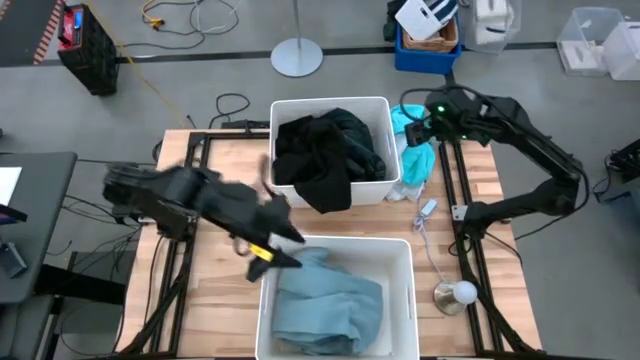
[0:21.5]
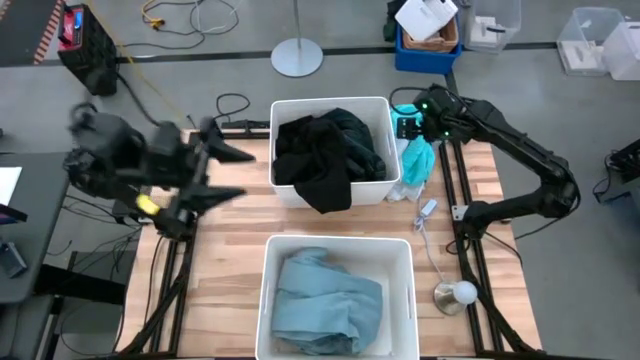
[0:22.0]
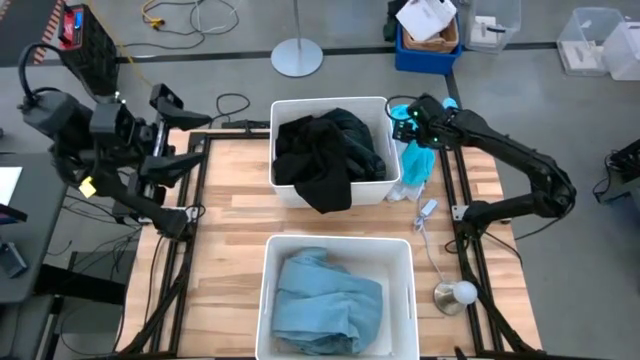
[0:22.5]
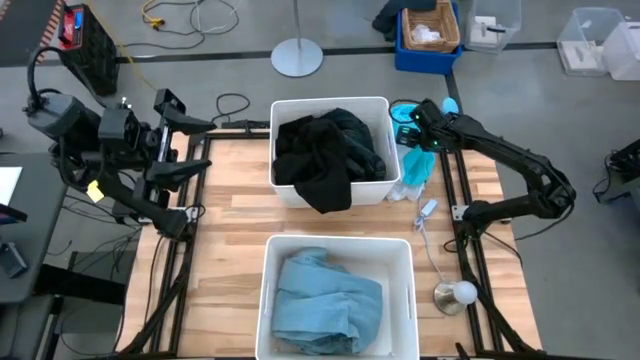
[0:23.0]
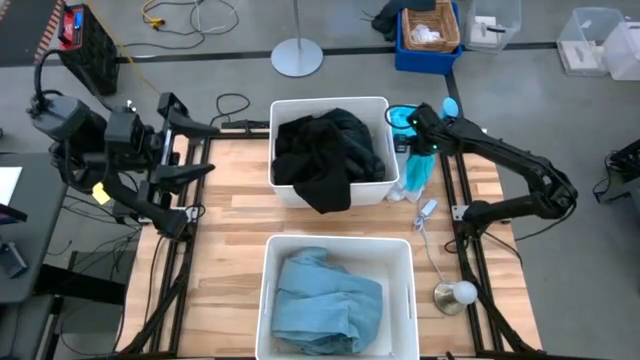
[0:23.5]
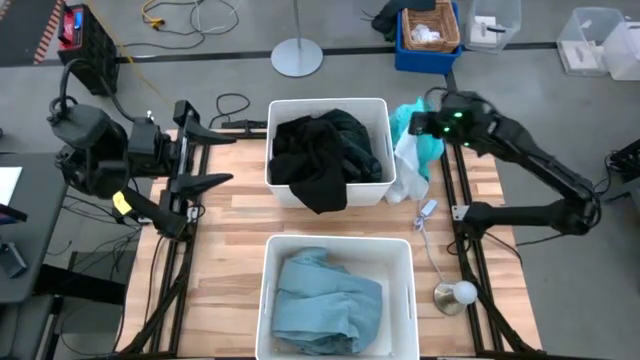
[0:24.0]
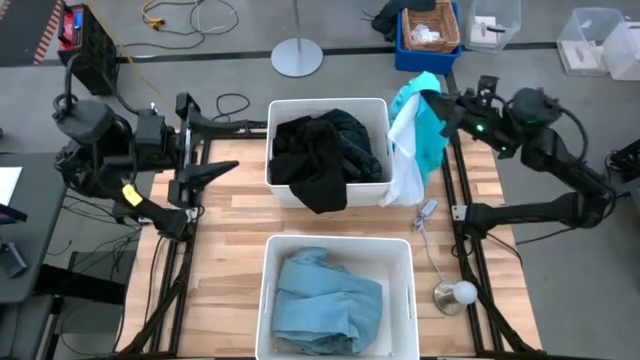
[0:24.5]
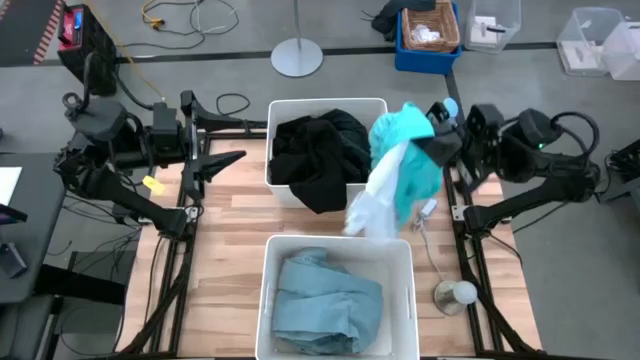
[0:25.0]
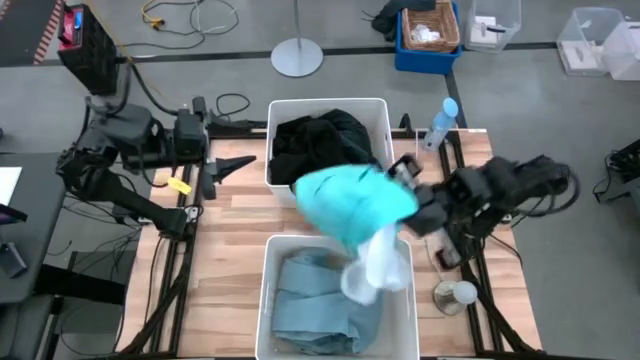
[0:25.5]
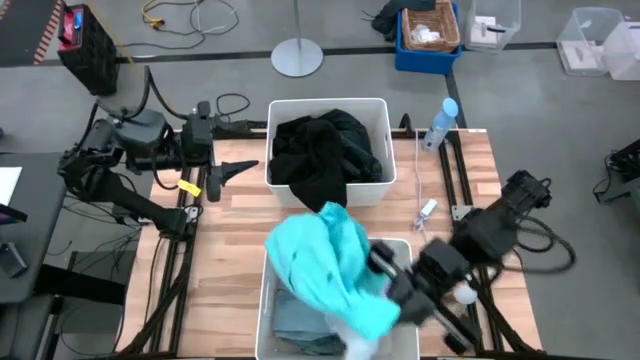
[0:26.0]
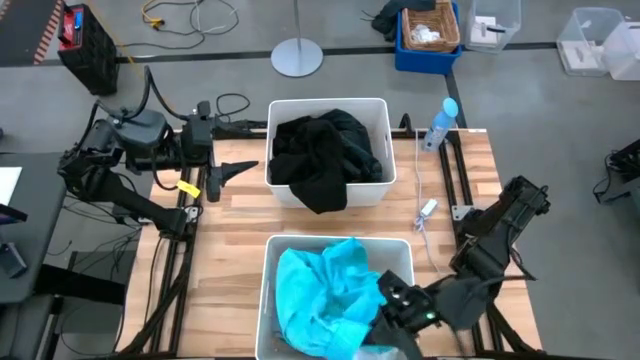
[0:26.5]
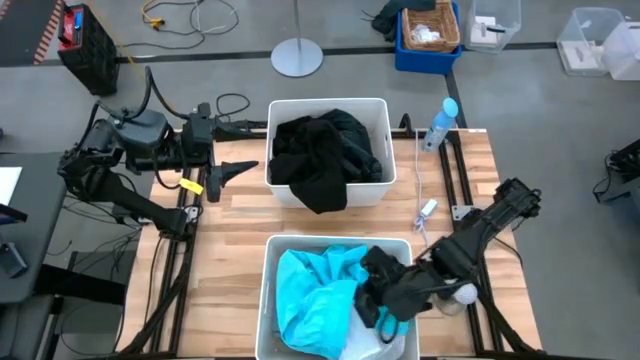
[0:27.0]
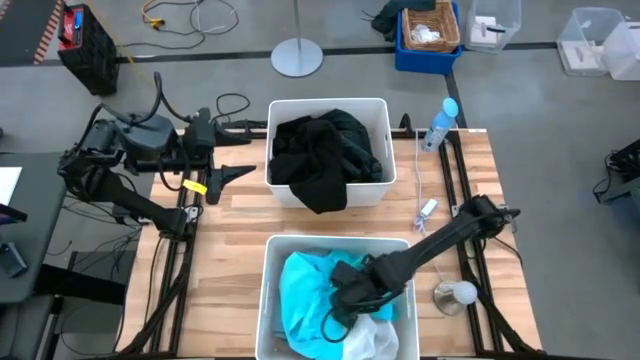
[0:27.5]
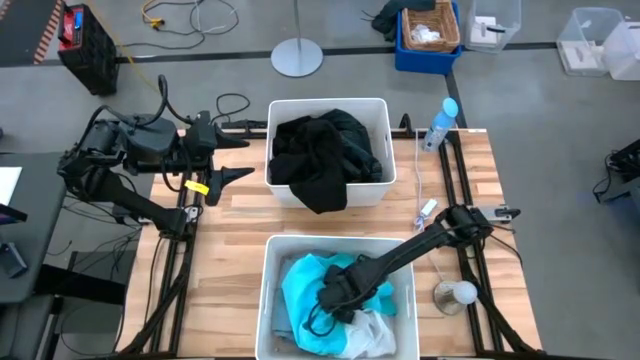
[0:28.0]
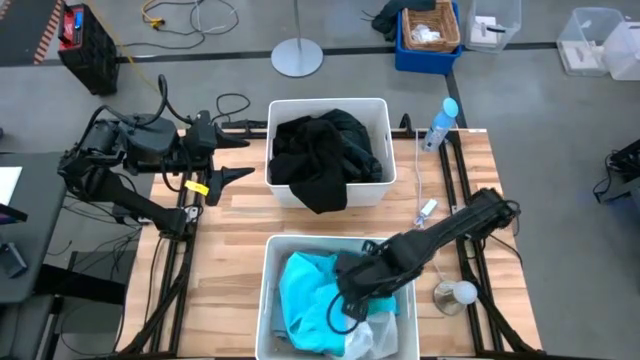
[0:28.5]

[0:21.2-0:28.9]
Task: Sort clothes
Put the light blue shorts into the bottom white bin

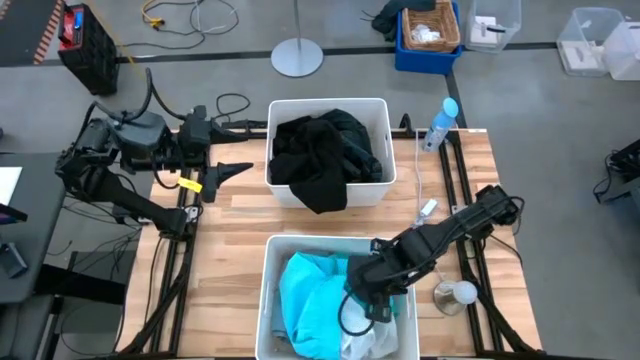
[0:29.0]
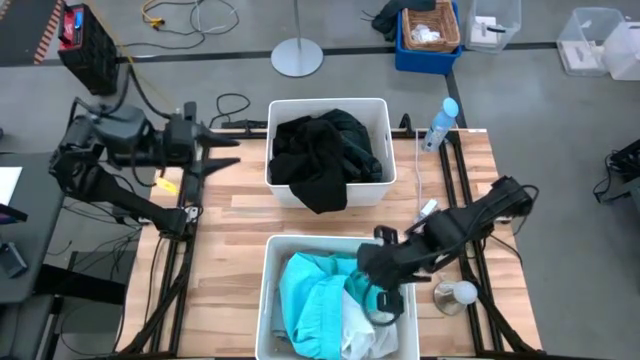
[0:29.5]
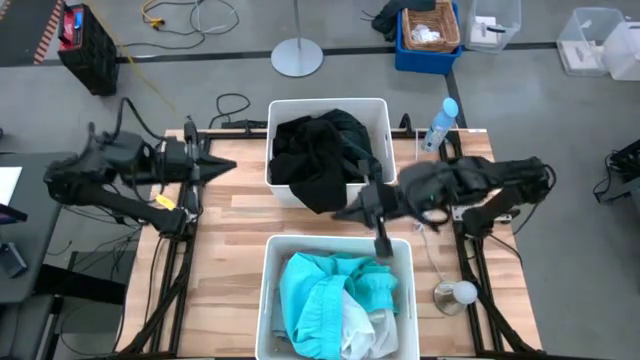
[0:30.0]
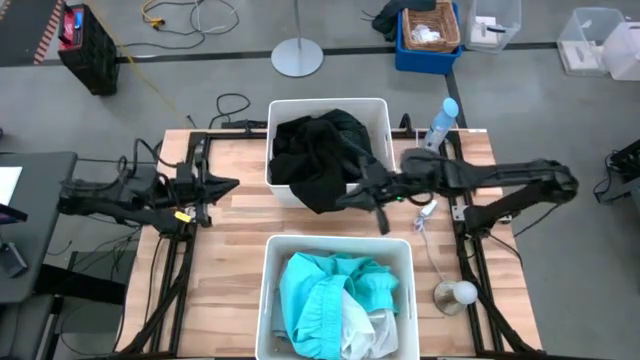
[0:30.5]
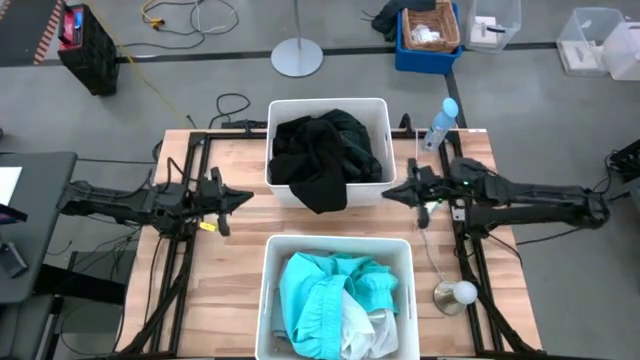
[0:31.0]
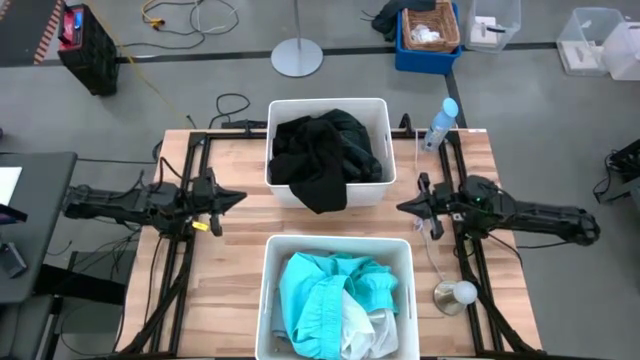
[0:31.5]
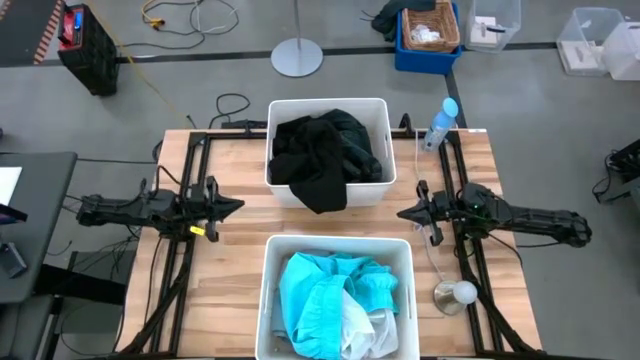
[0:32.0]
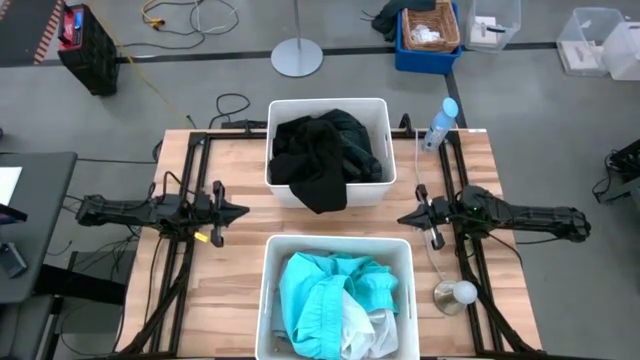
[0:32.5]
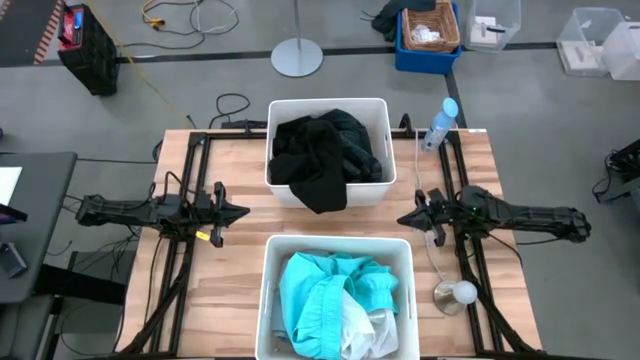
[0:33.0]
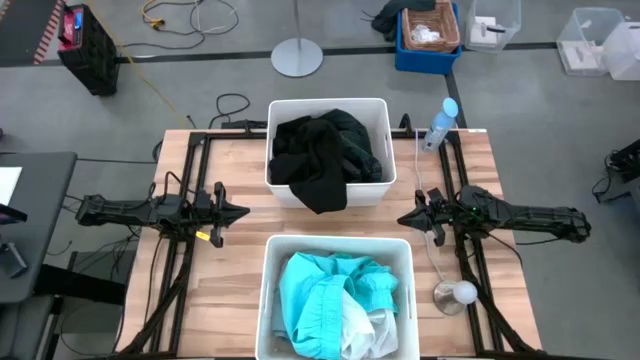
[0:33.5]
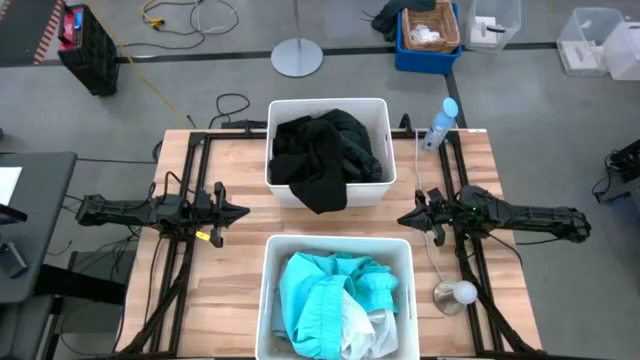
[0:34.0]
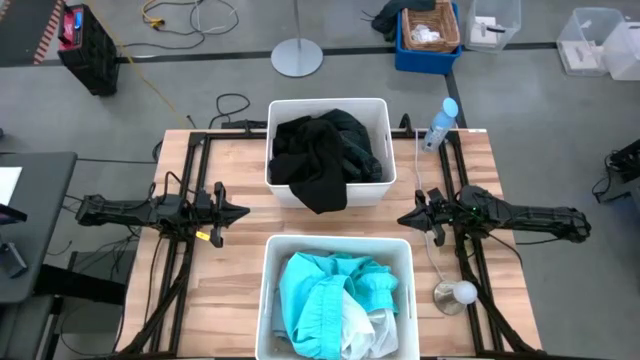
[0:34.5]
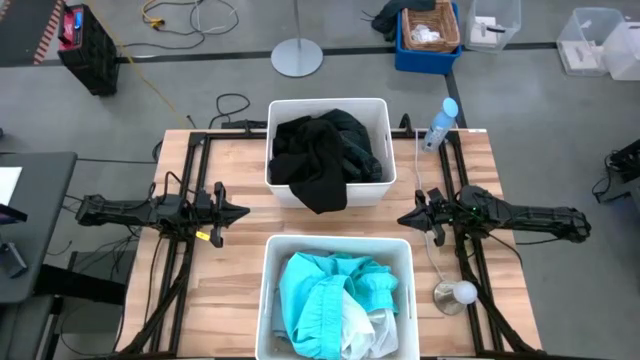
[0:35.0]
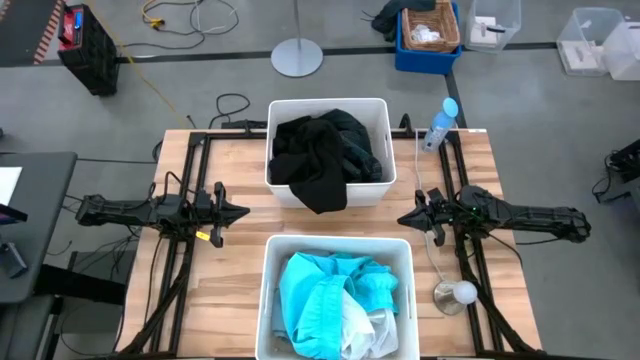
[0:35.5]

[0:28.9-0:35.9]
Return to Home Position

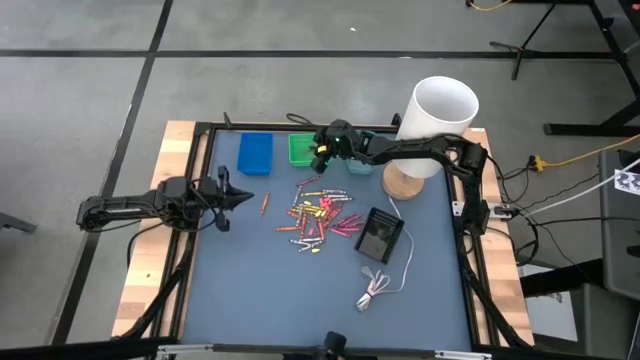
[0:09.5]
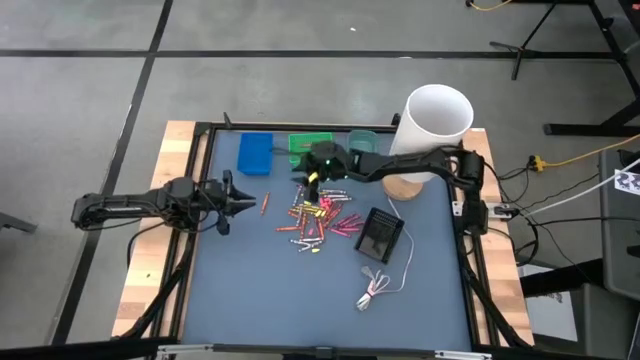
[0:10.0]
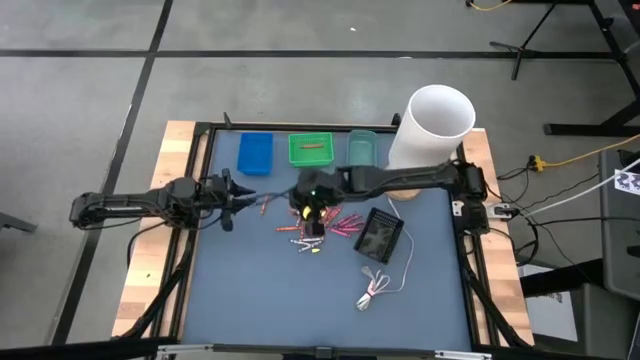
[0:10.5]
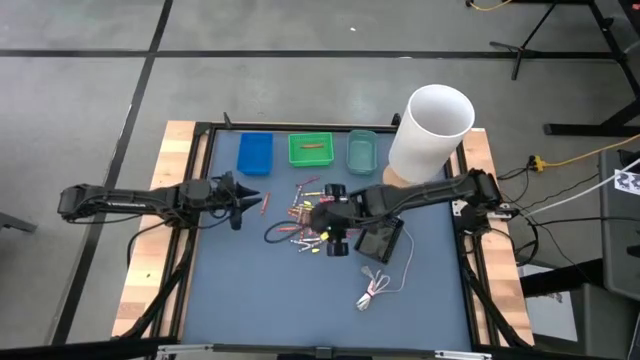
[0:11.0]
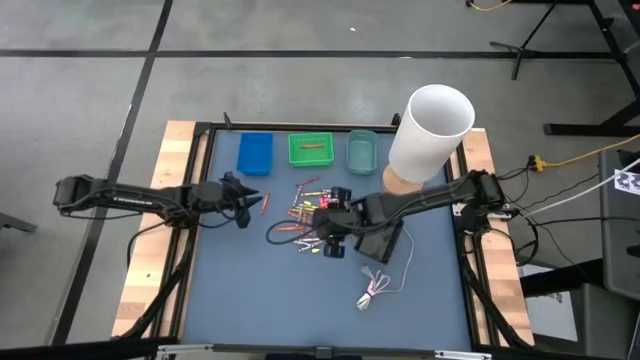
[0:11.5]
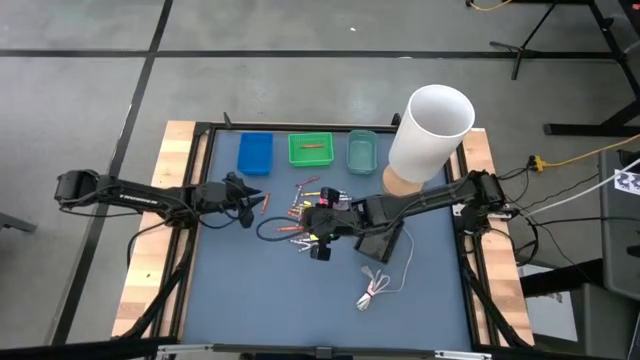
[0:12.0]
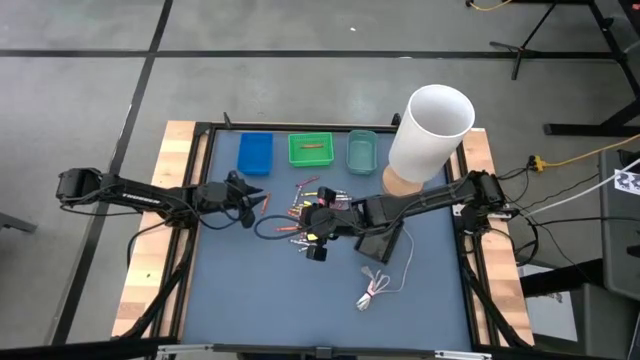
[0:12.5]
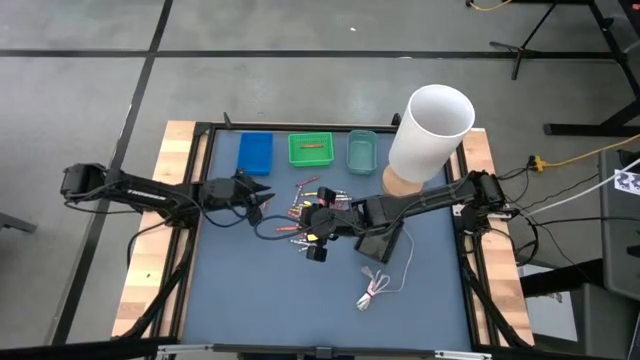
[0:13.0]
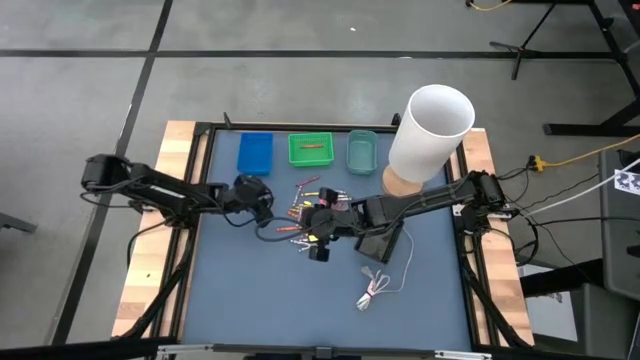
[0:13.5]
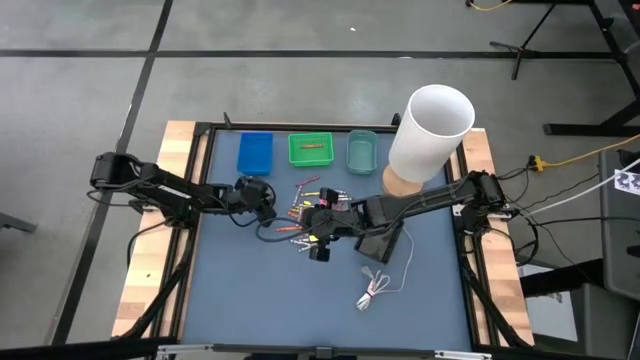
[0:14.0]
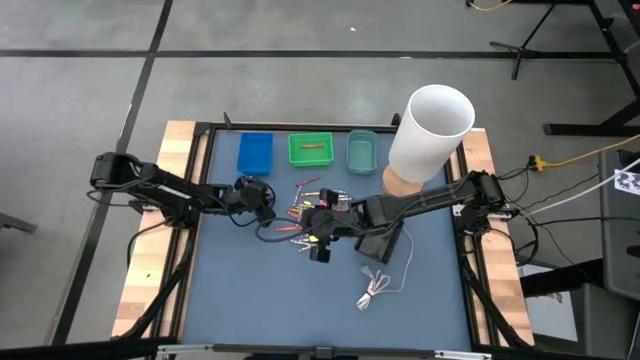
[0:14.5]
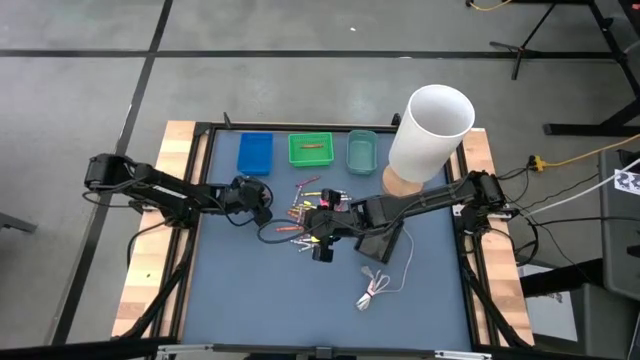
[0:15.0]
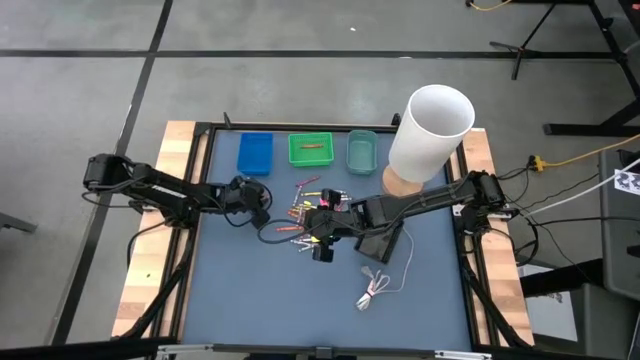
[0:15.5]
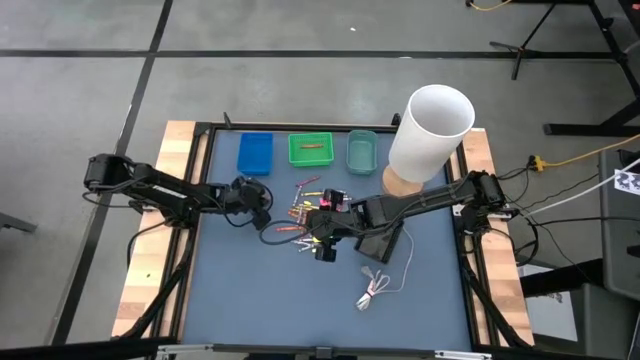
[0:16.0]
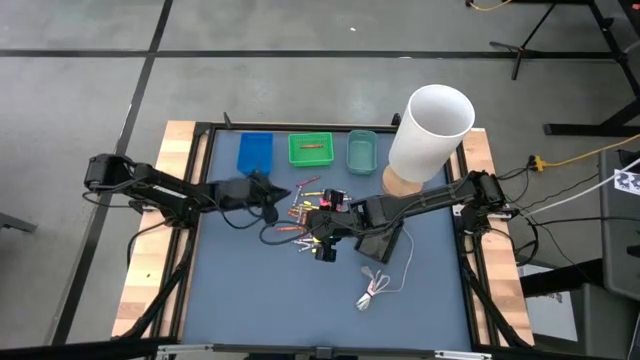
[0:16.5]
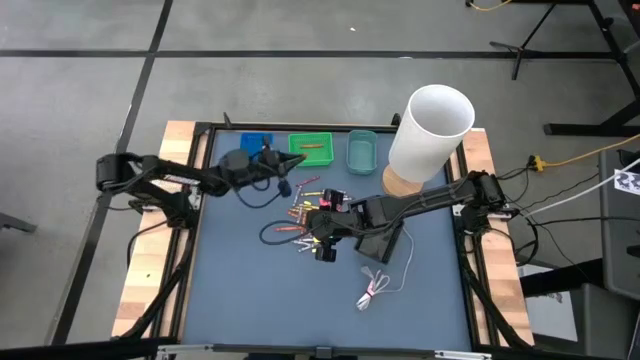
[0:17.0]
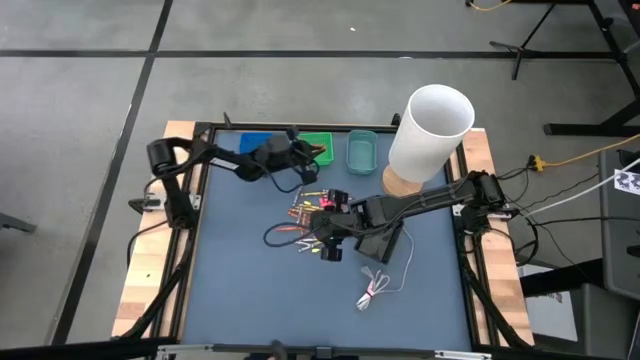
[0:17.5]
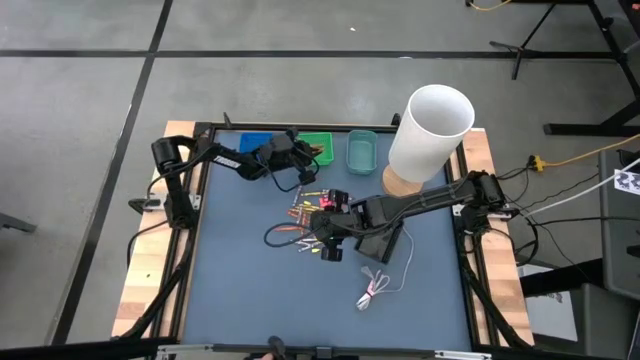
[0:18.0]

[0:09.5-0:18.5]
Task: Sort crayons
Put the orange crayon into the green bin
